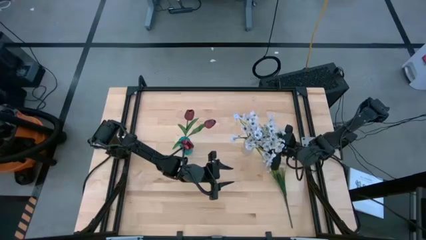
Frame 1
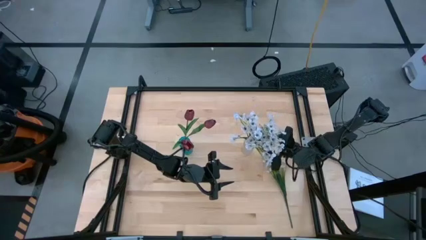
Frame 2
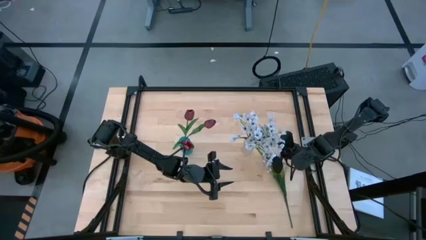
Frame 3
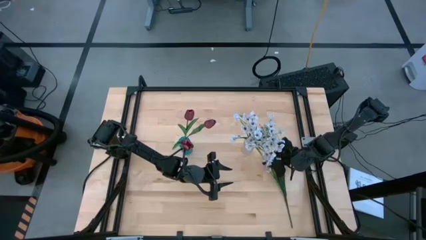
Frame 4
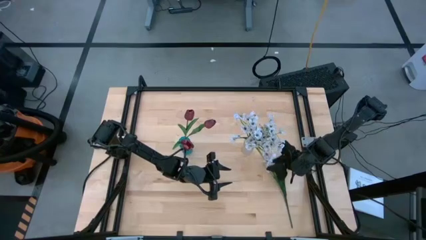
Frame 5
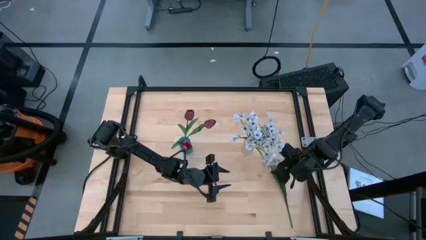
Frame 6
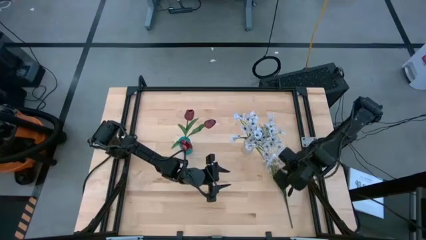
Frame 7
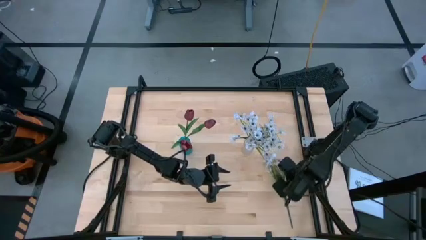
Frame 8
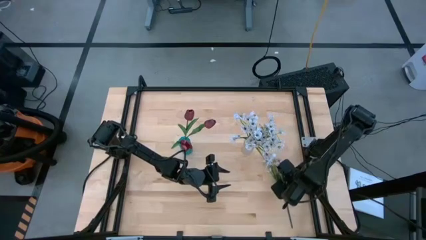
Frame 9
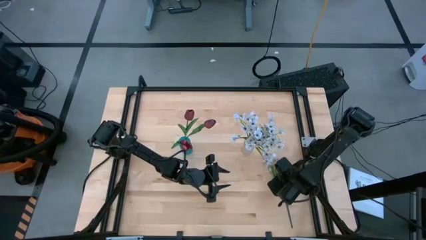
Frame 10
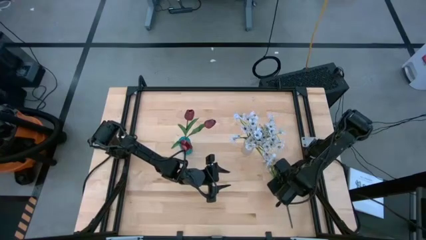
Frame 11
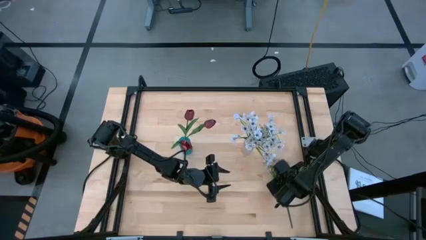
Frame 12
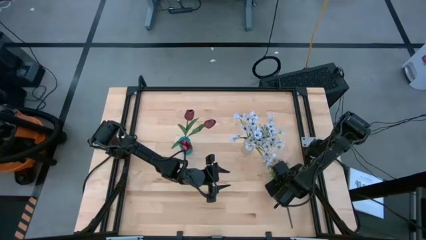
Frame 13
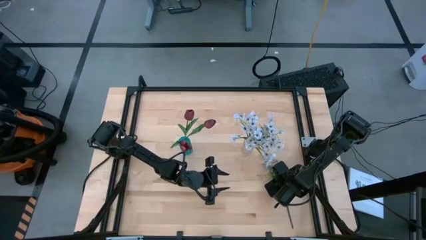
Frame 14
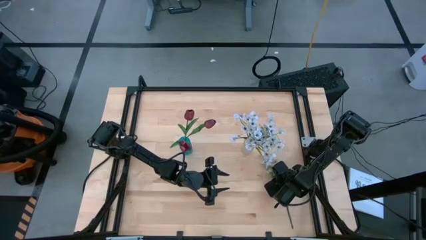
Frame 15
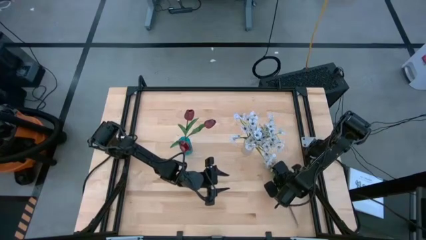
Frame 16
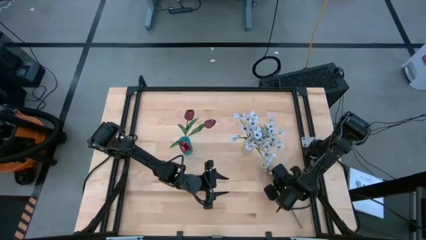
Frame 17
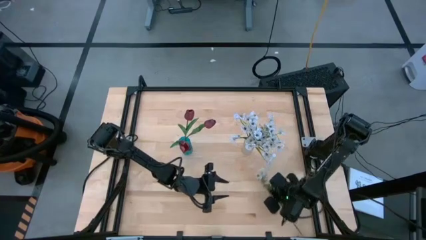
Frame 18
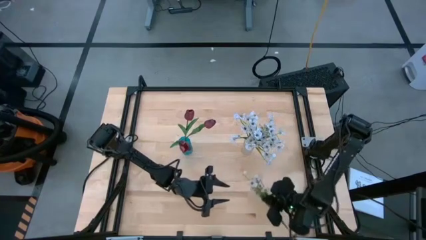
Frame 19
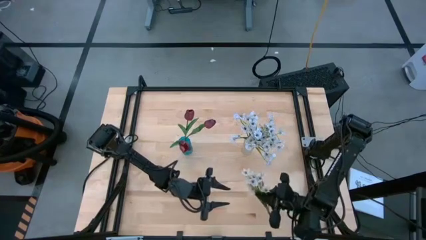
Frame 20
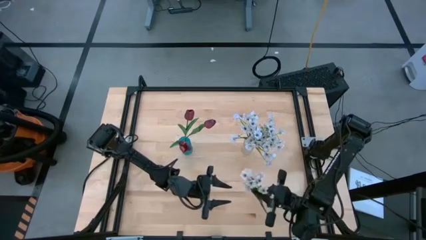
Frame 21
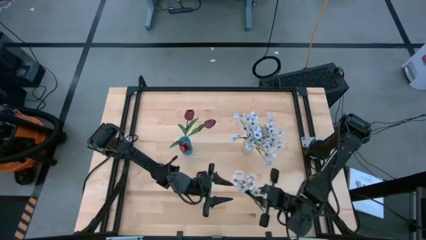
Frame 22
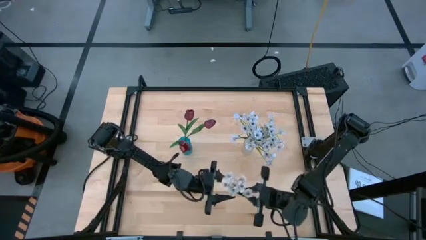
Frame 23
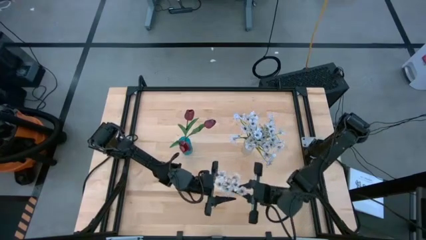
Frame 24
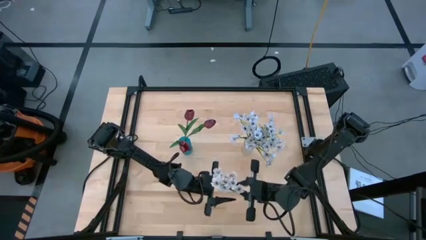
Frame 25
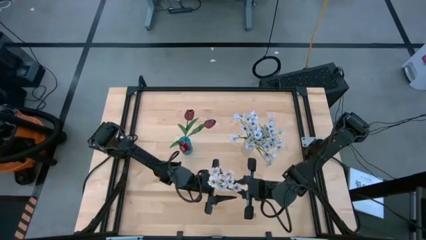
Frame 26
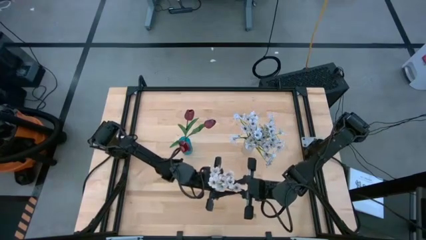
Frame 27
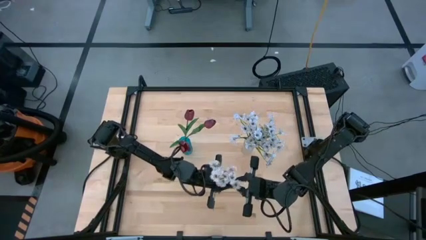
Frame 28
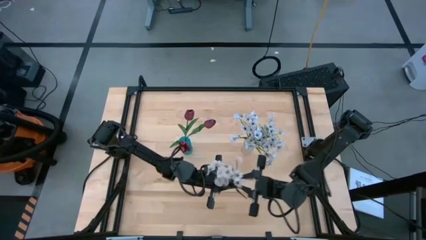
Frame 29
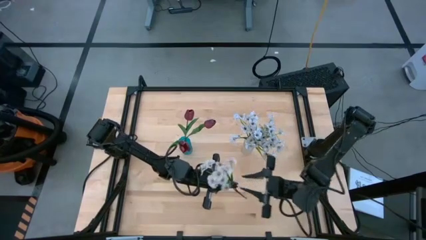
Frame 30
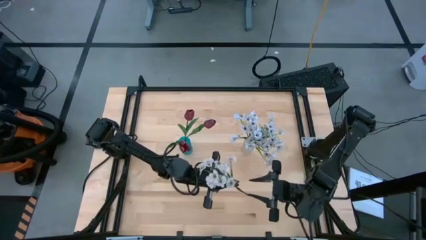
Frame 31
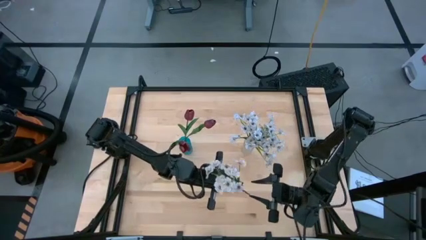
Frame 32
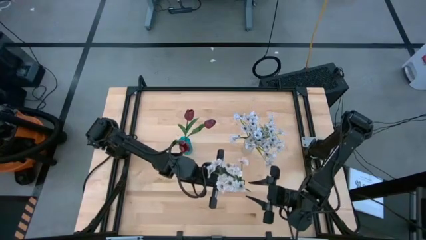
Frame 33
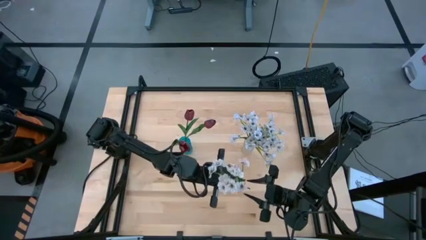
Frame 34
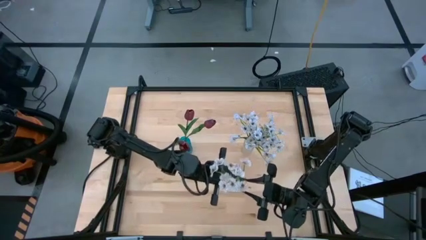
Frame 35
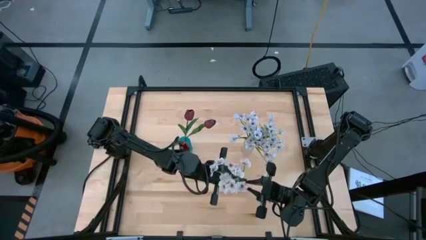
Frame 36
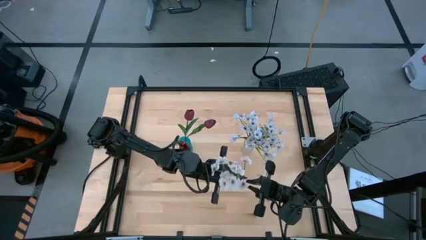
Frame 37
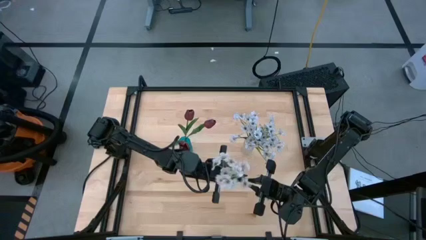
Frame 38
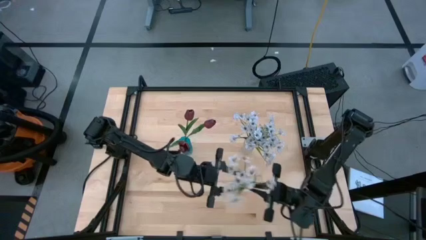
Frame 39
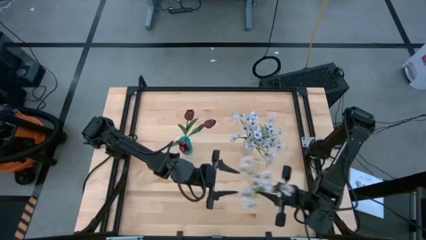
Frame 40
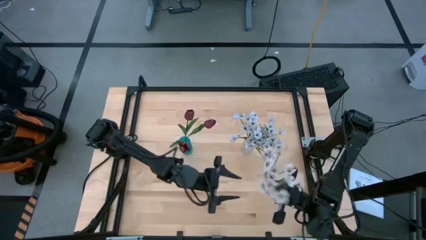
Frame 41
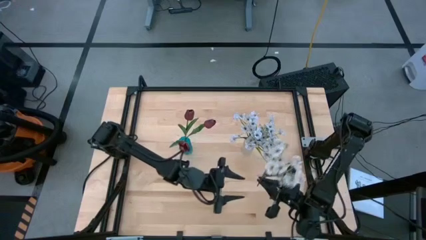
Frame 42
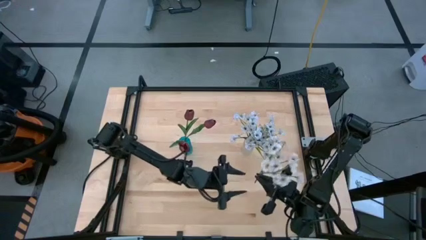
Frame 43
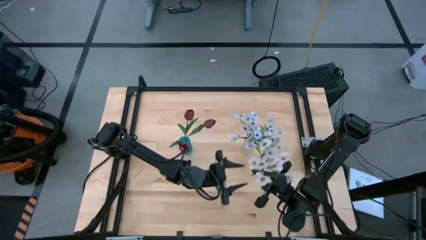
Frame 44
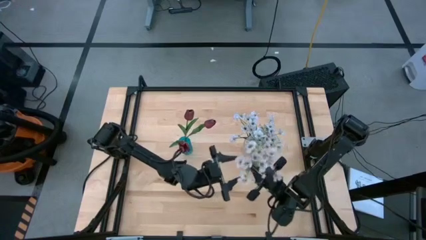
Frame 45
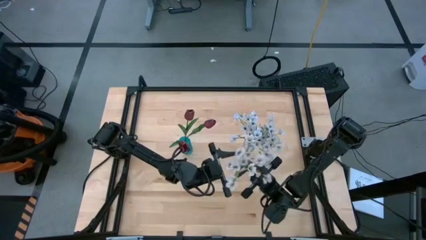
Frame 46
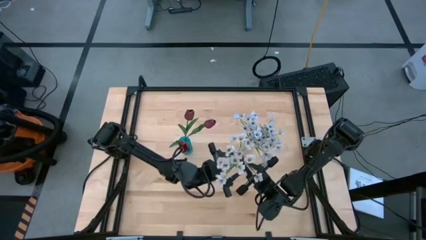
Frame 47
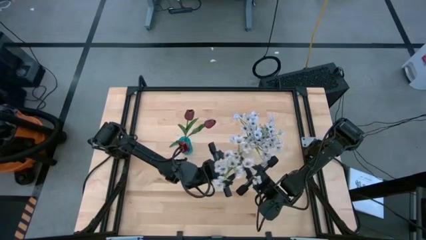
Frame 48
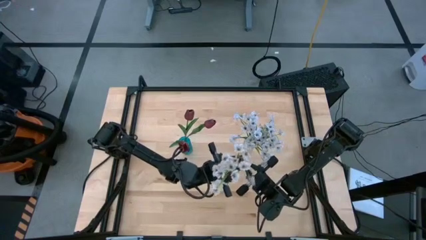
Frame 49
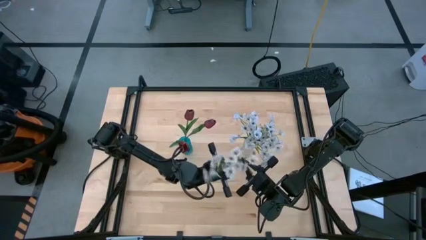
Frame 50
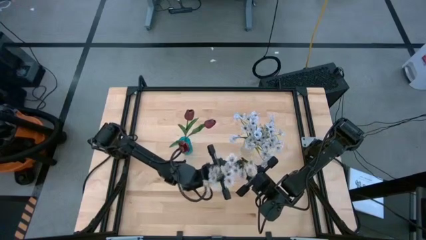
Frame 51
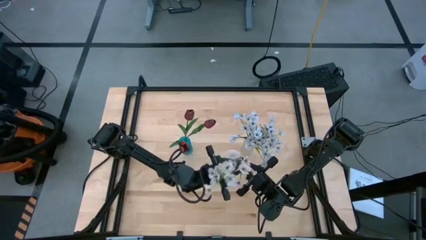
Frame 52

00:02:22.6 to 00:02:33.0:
Task: Sort flowers into vase by color
Put the white daisies into the transparent vase

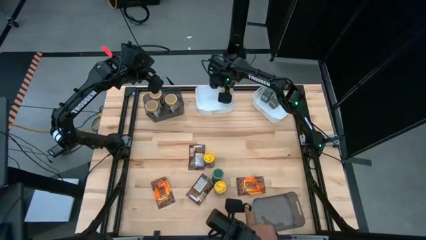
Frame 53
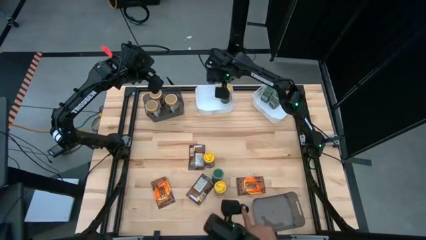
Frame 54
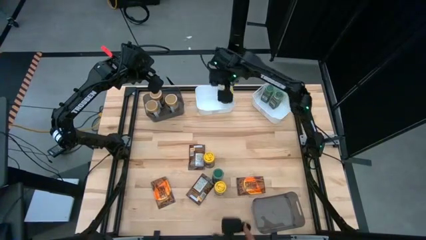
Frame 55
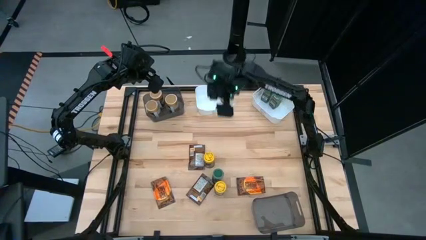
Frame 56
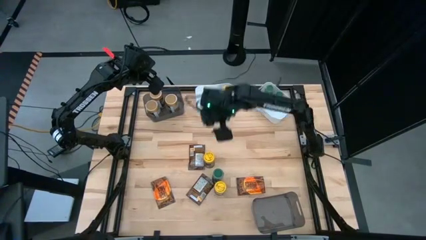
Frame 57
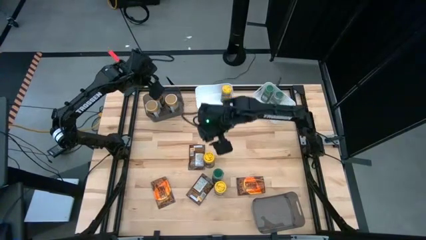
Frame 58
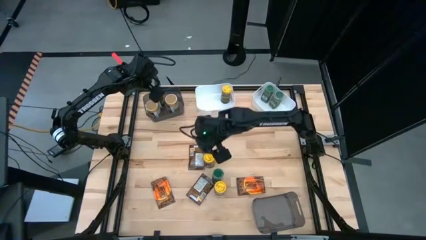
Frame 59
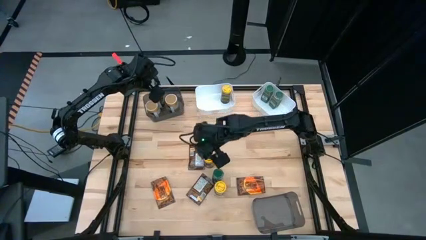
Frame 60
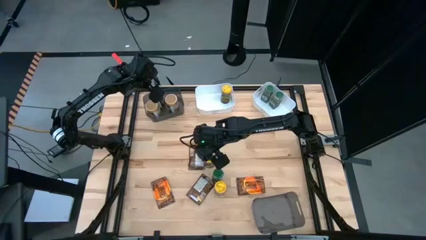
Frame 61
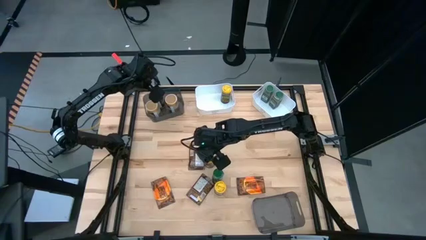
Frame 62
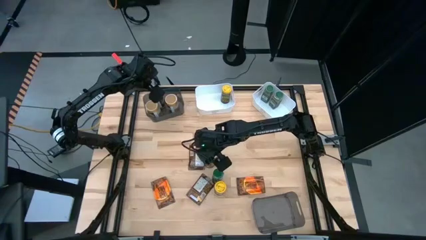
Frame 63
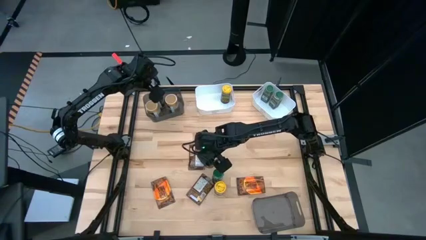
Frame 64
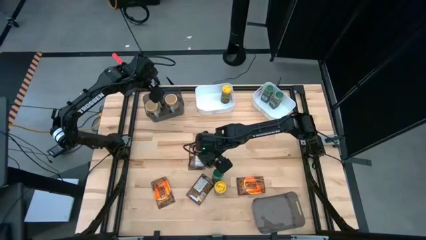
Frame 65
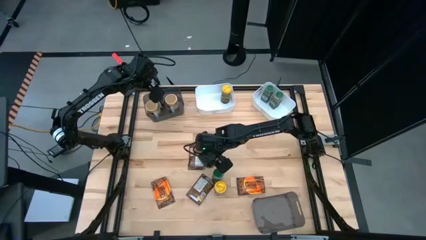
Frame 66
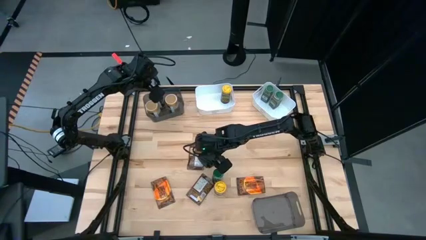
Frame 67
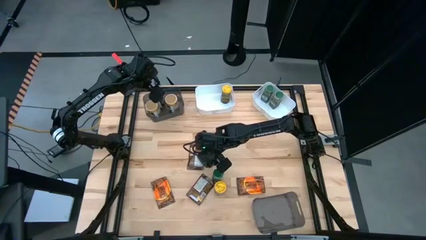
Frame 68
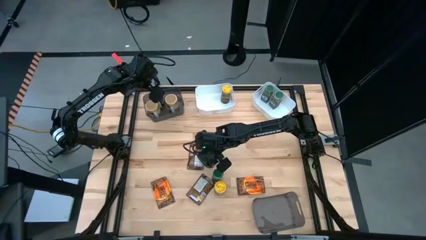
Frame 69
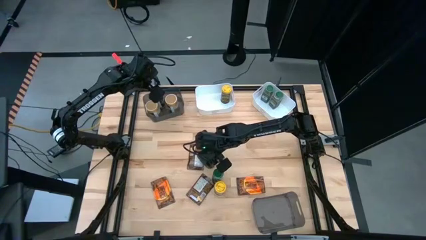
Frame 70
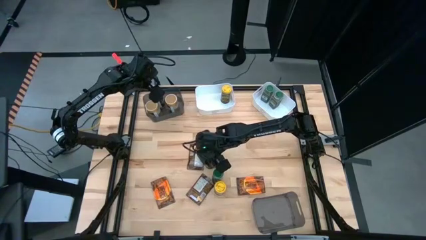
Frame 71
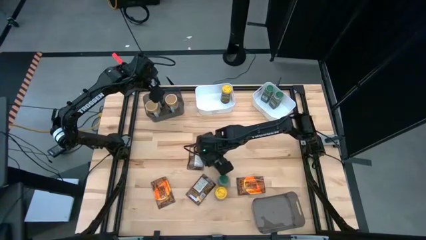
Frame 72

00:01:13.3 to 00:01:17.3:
Task: Sort spices by type
Put the yellow seasoning bottle into the left white bin

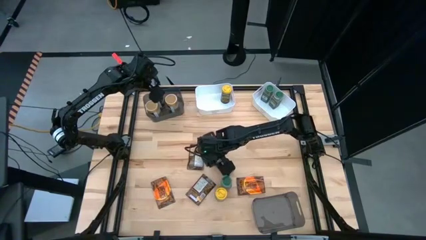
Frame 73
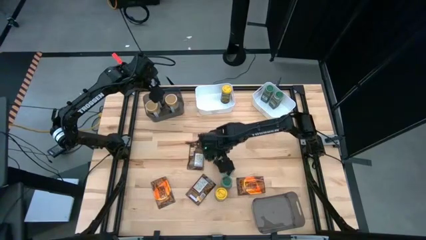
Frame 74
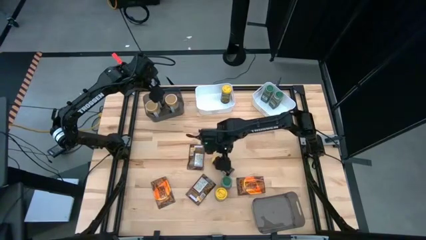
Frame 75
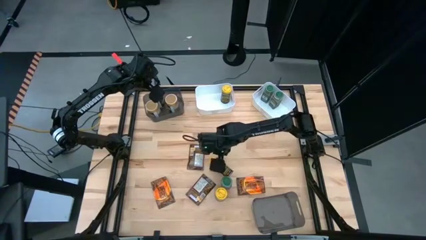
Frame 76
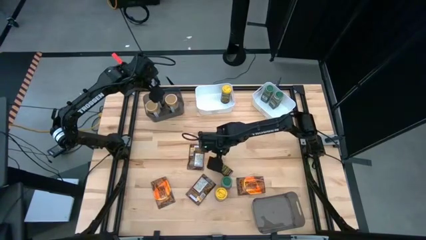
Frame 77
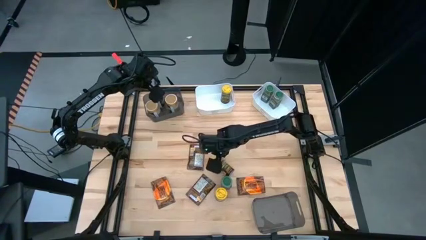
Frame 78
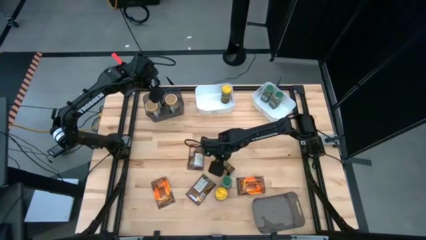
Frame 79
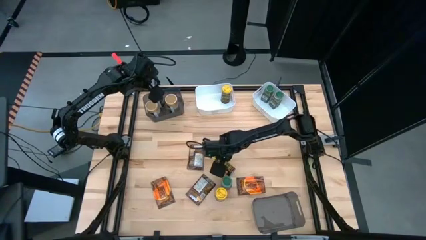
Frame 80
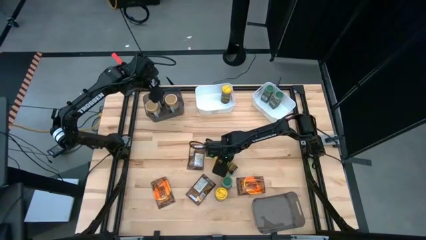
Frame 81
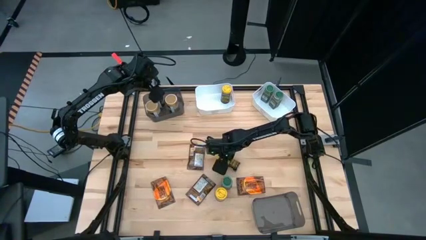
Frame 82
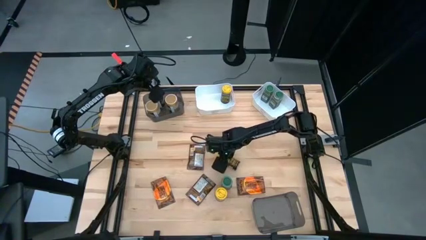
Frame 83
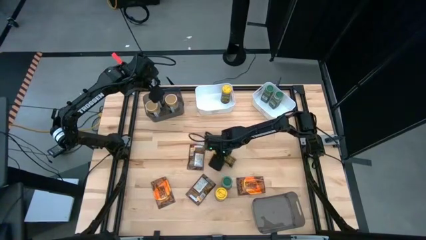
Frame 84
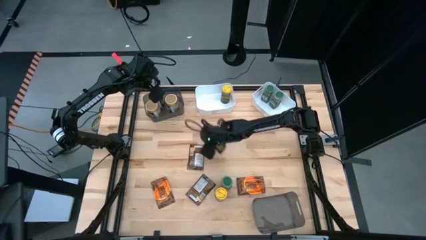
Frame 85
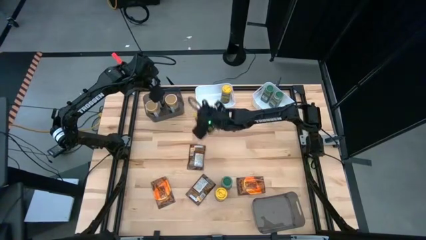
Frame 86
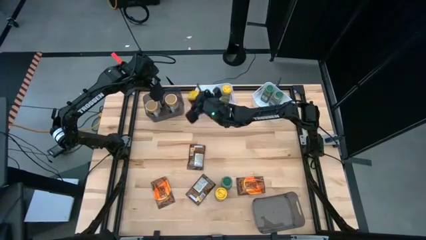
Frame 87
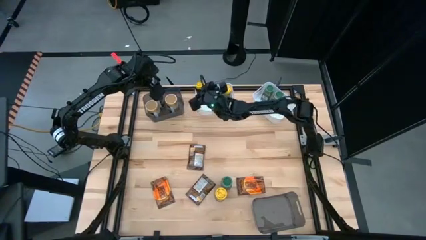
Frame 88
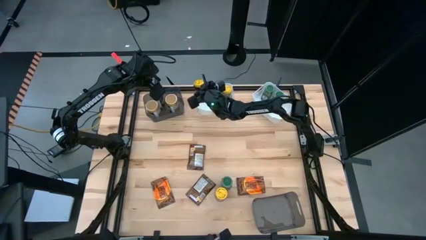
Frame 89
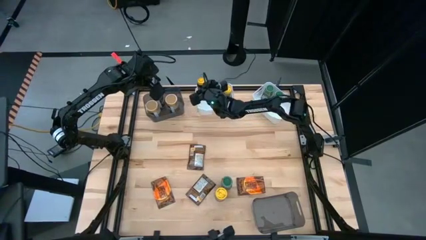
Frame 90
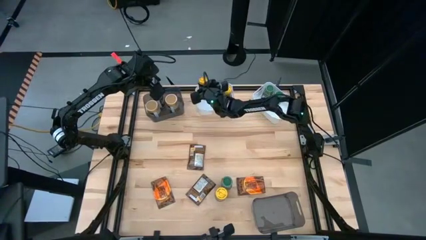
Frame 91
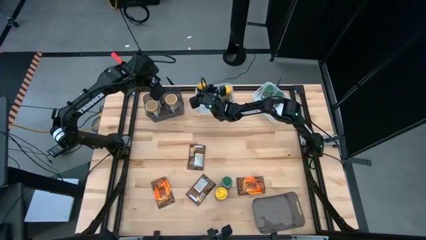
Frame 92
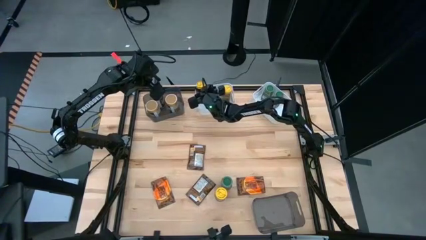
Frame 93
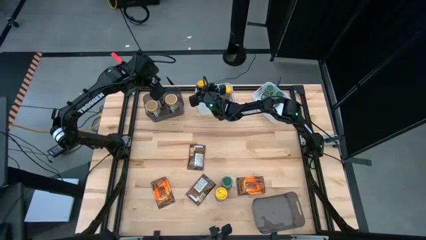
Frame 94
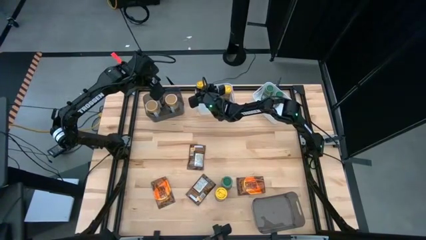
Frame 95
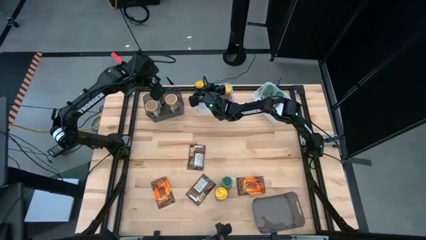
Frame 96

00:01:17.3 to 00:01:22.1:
Put the yellow seasoning bottle into the left white bin
